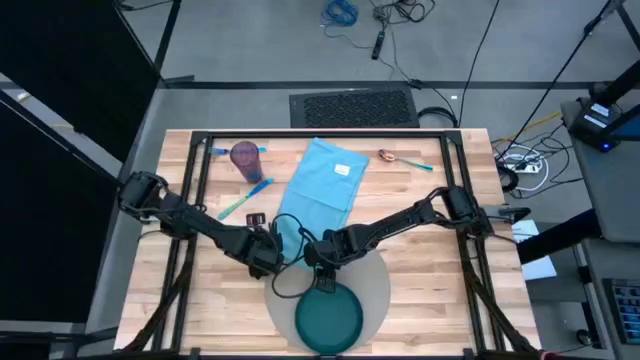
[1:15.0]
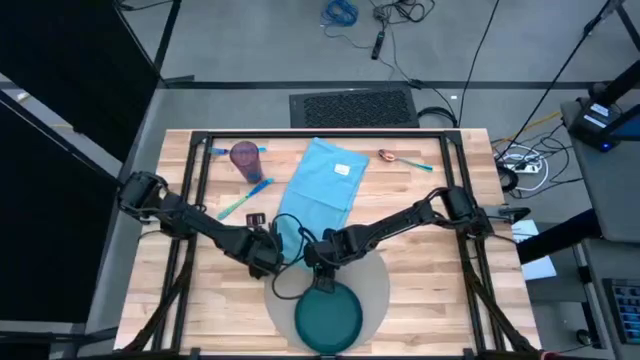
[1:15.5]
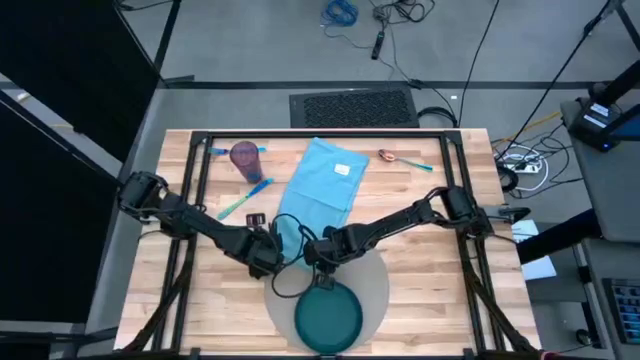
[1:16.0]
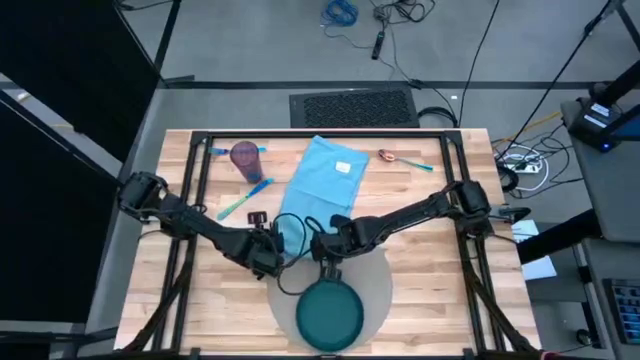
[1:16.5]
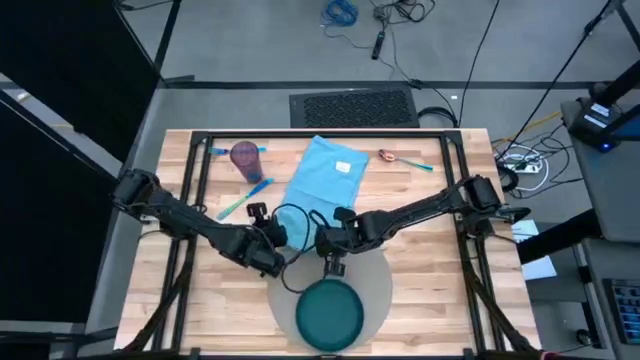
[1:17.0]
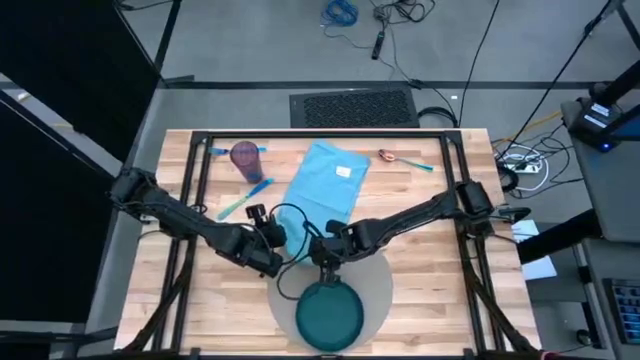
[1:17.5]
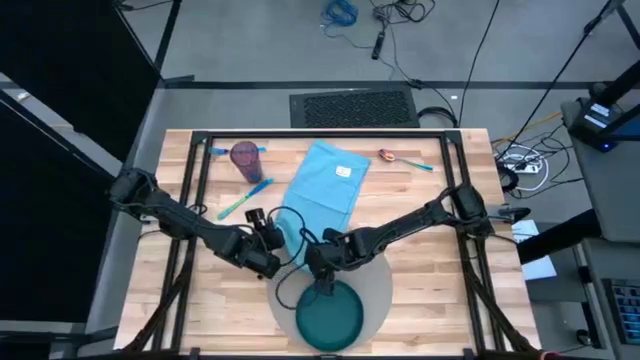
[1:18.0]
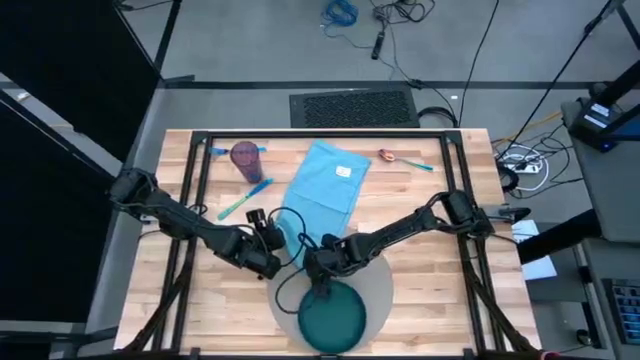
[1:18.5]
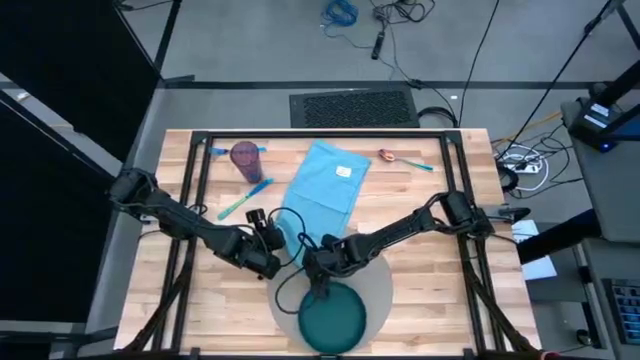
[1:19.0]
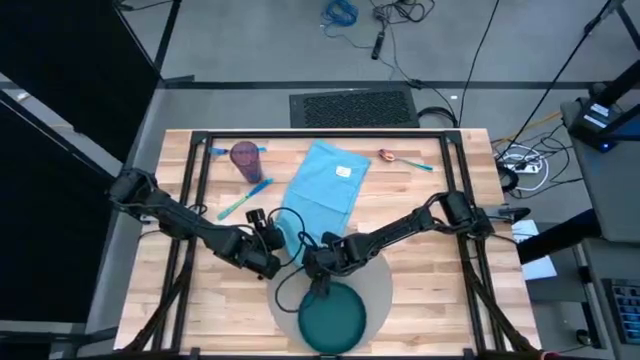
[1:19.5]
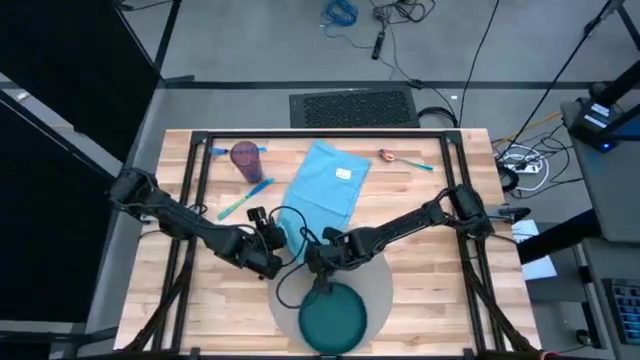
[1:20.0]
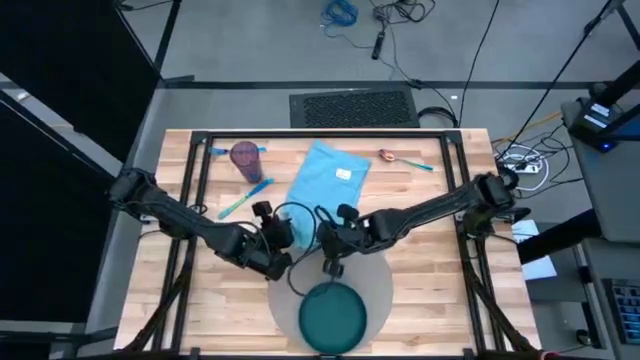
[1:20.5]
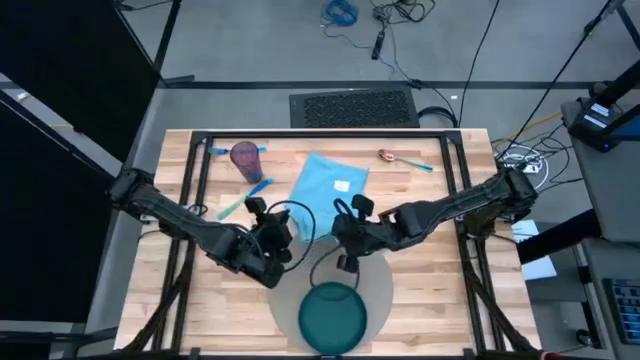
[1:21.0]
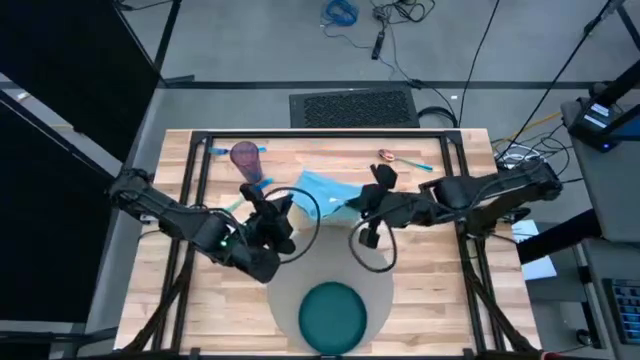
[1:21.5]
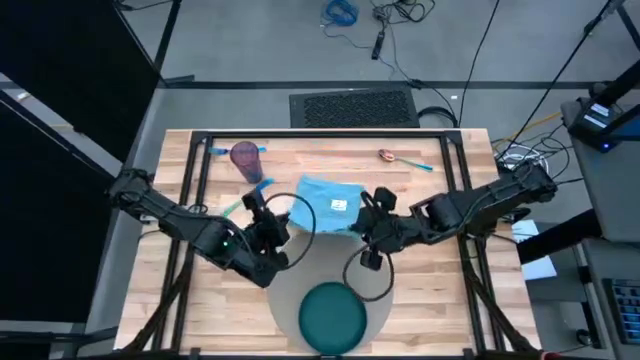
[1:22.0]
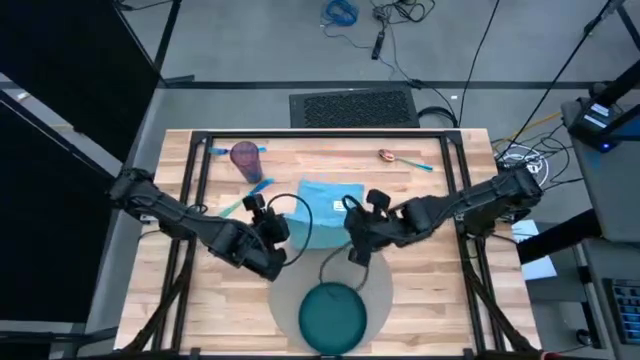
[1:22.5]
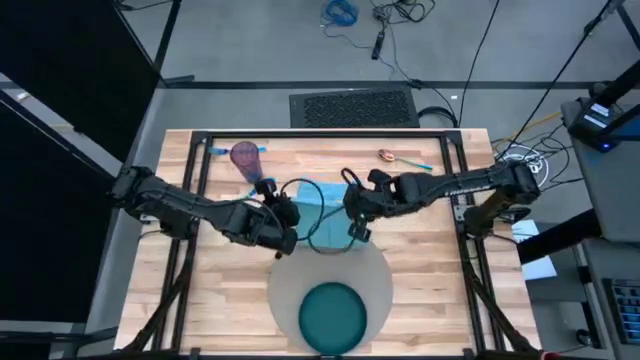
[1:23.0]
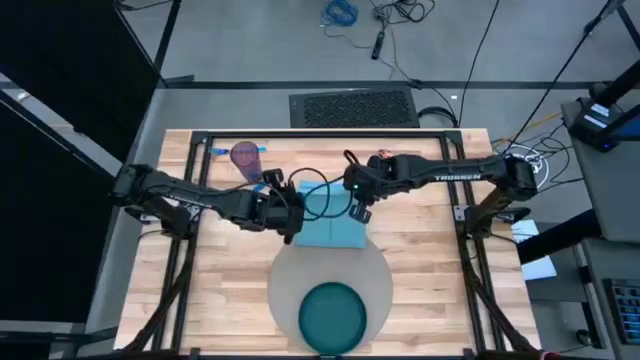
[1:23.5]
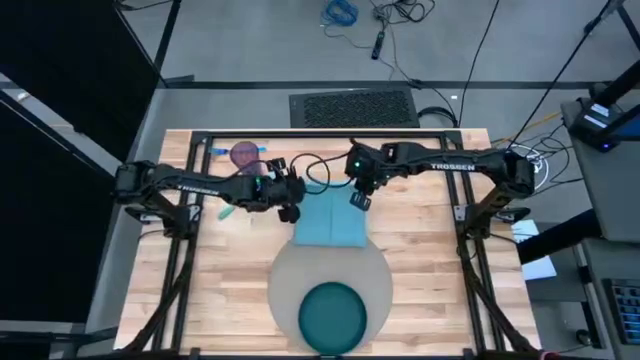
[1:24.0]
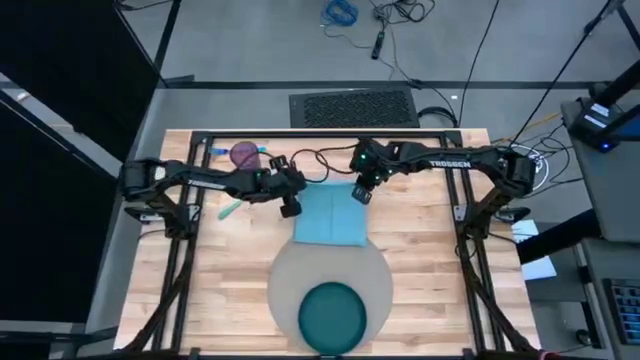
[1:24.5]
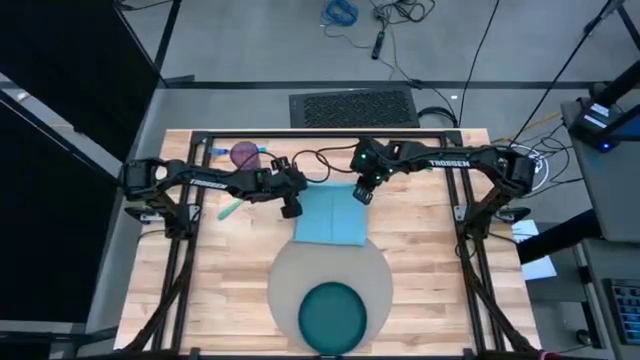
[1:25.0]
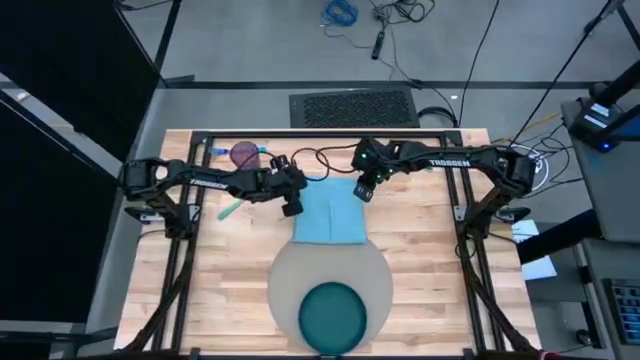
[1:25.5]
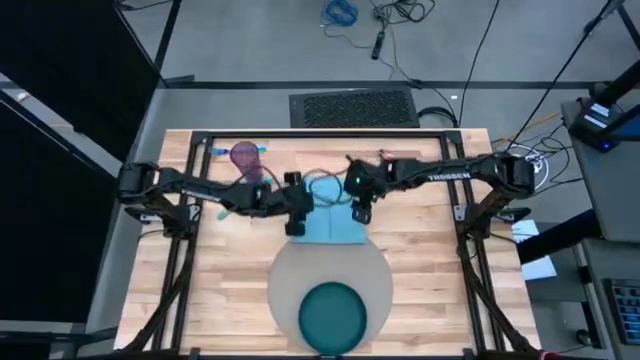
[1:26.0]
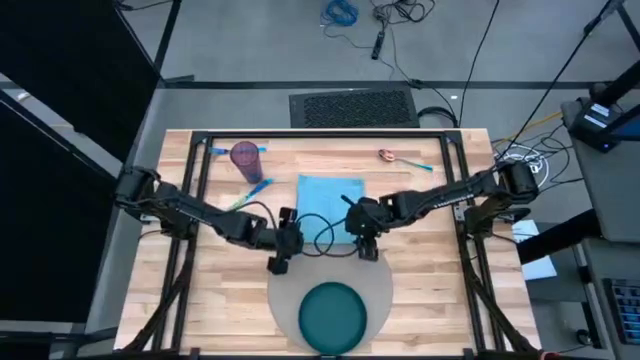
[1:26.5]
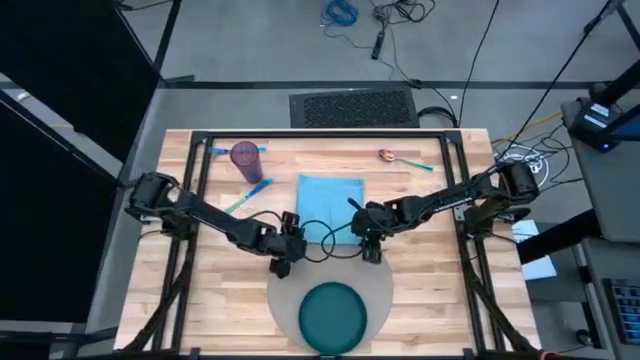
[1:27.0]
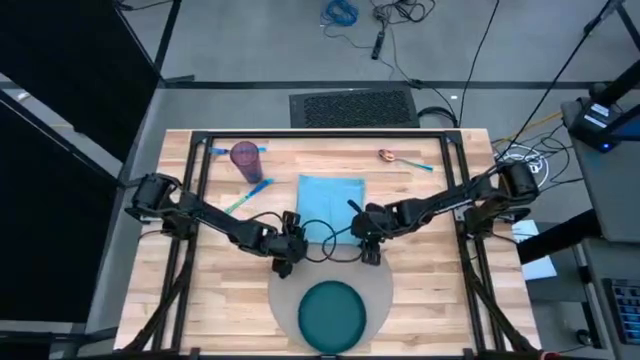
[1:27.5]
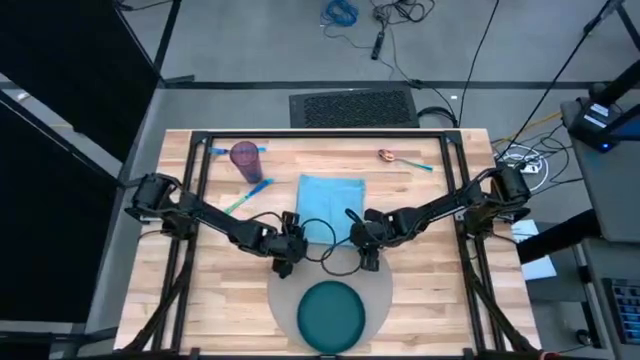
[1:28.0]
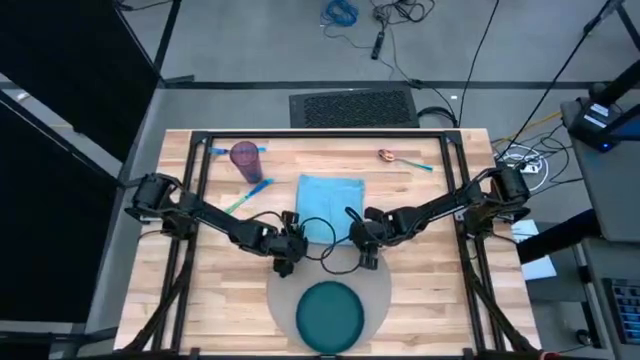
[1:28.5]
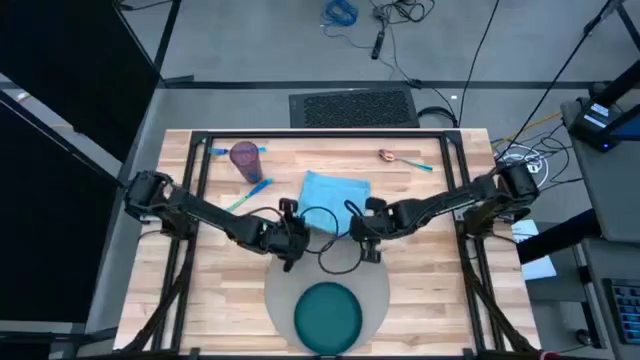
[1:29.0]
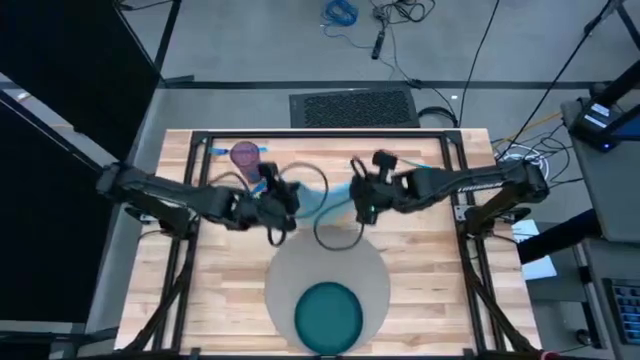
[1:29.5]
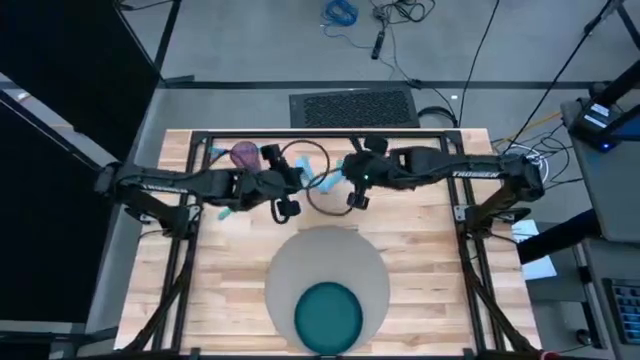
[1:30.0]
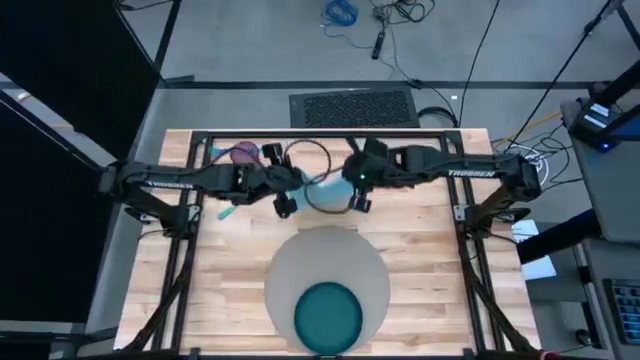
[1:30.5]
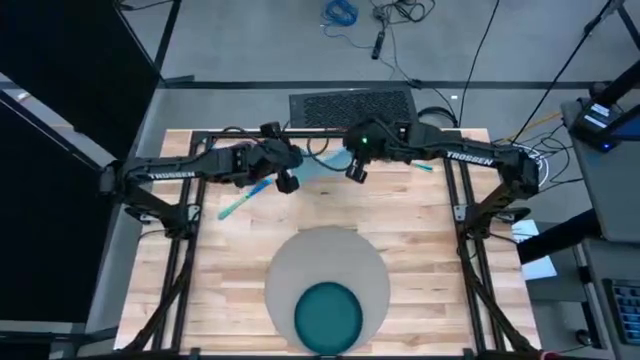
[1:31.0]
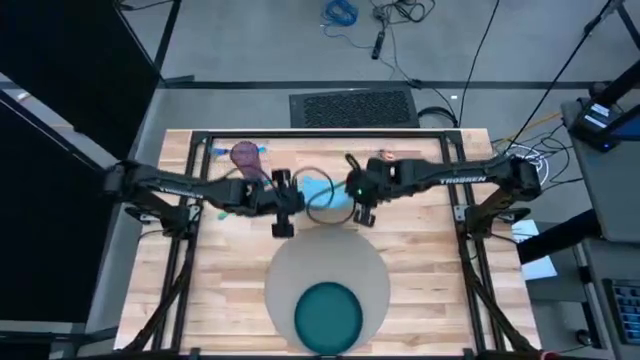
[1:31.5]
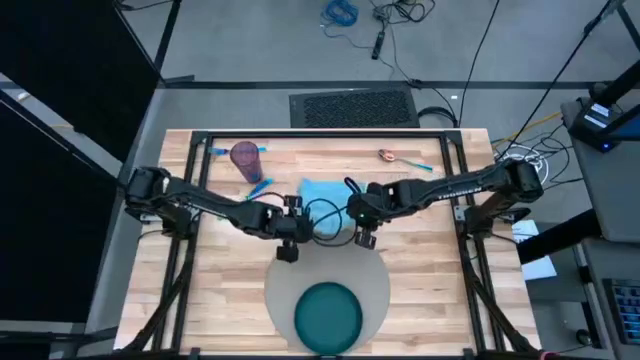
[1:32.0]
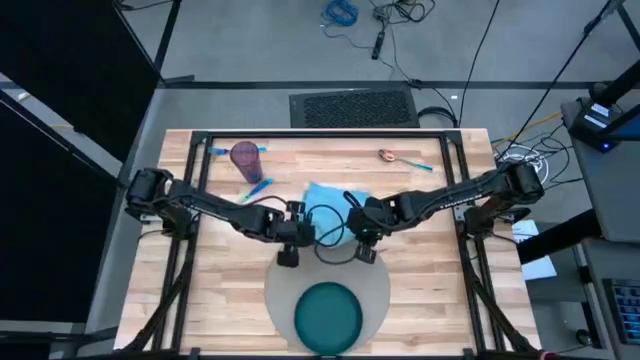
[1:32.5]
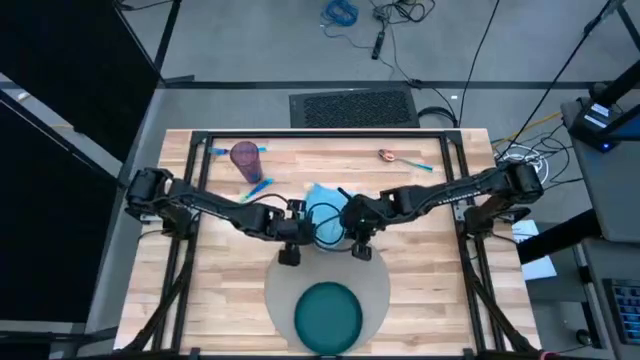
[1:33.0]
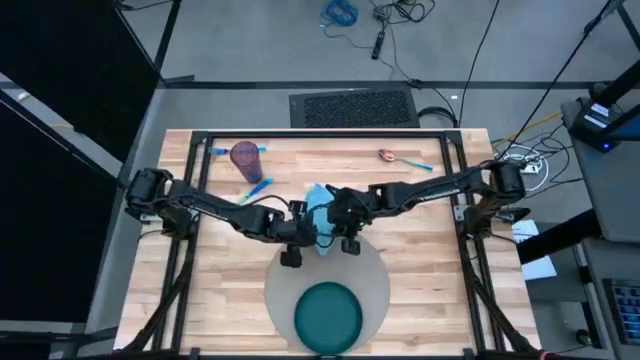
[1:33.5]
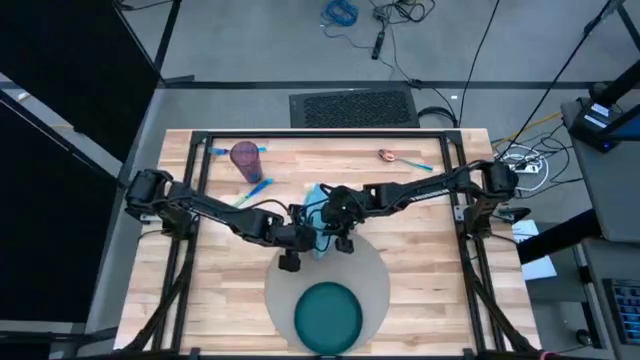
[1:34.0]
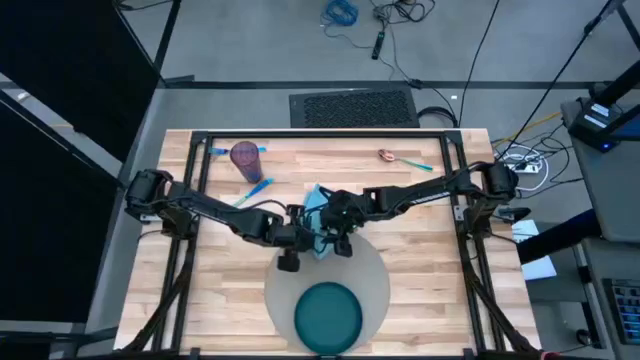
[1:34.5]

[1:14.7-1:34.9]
Task: Set table place
Fold the blue napkin

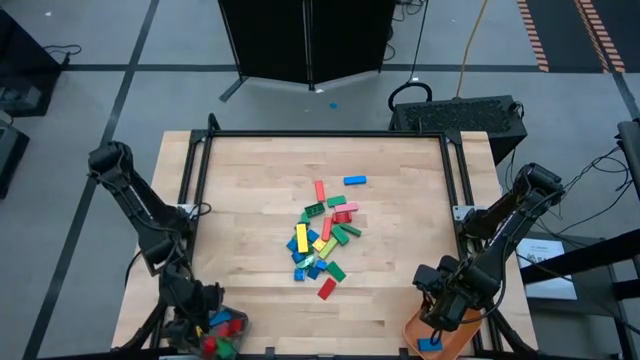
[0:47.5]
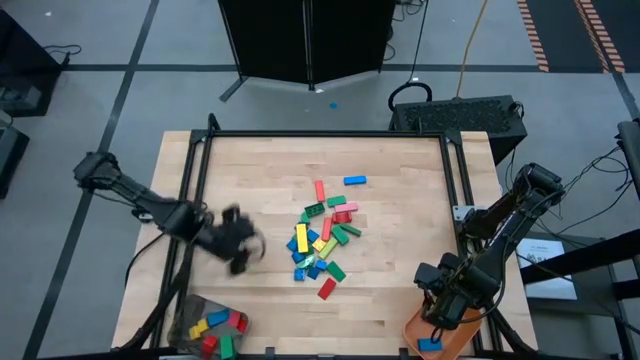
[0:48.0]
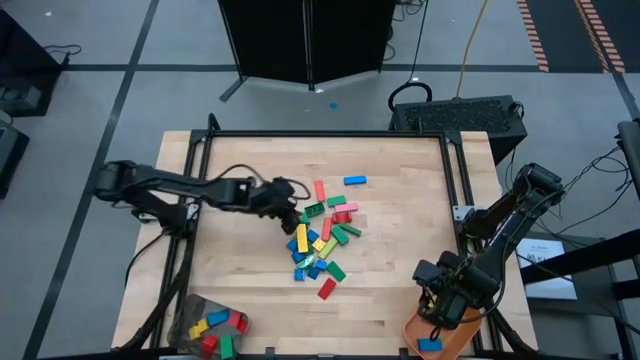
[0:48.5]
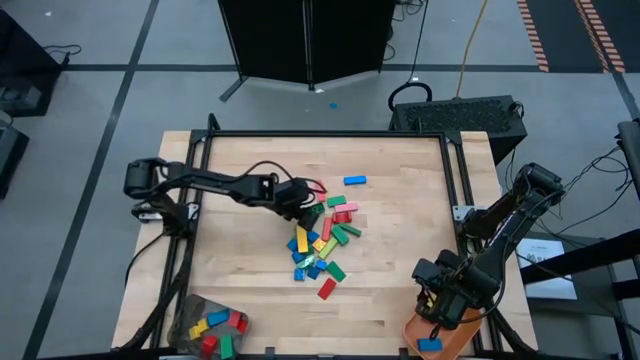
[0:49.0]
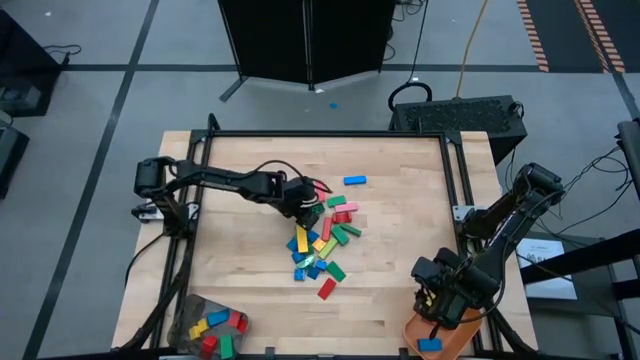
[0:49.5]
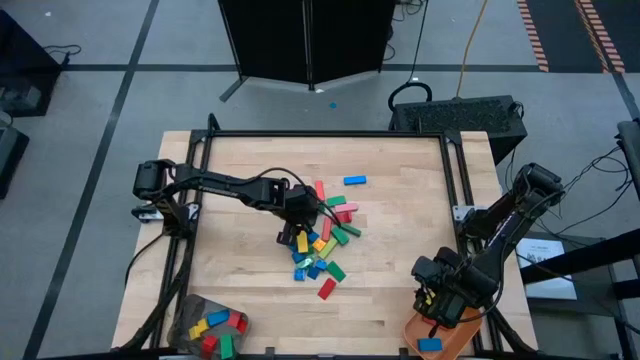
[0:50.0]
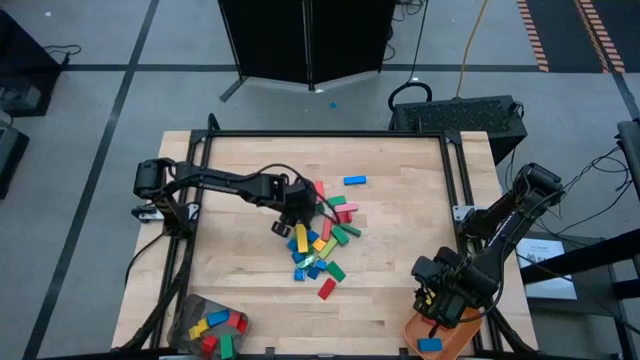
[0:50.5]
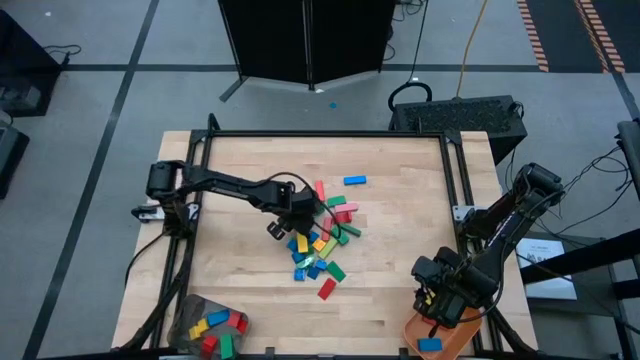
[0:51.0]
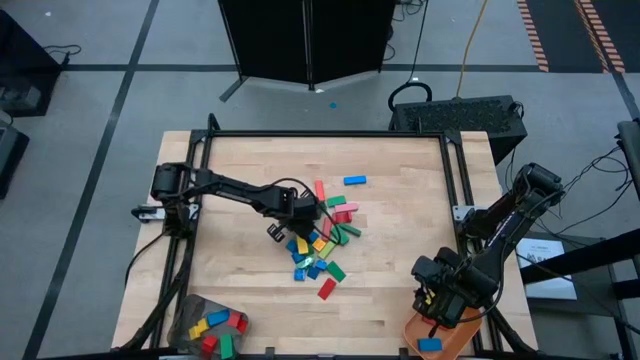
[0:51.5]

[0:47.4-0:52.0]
Task: Sort blocks by size
Put the green semicircle block into the black bin
